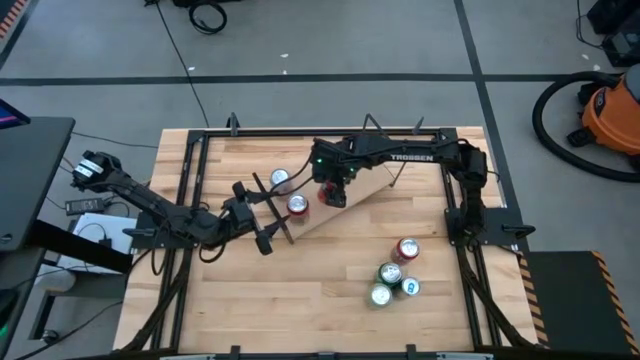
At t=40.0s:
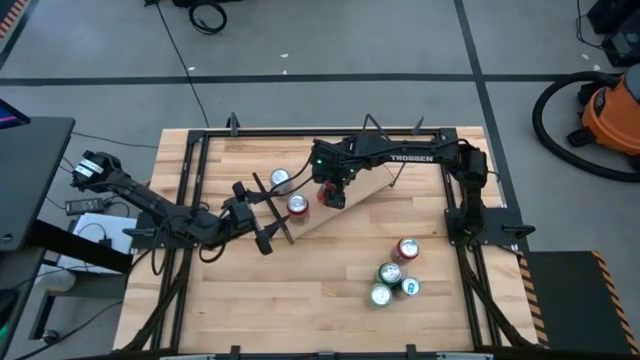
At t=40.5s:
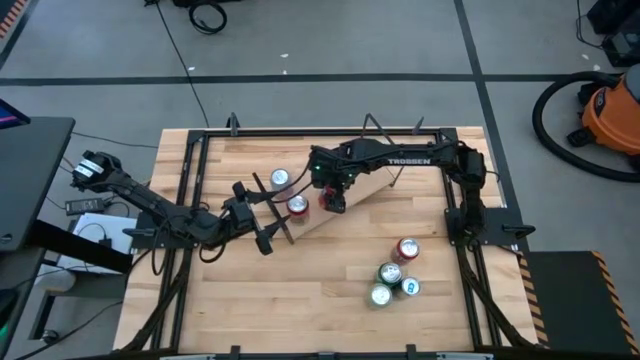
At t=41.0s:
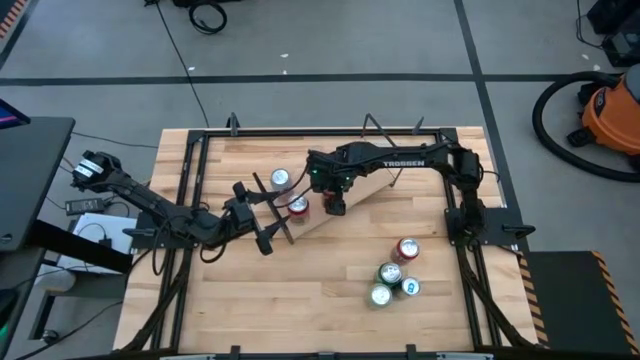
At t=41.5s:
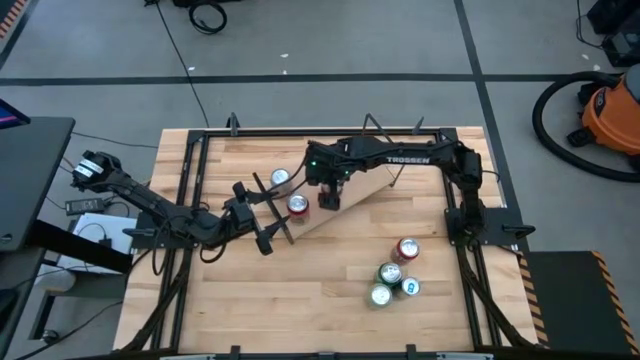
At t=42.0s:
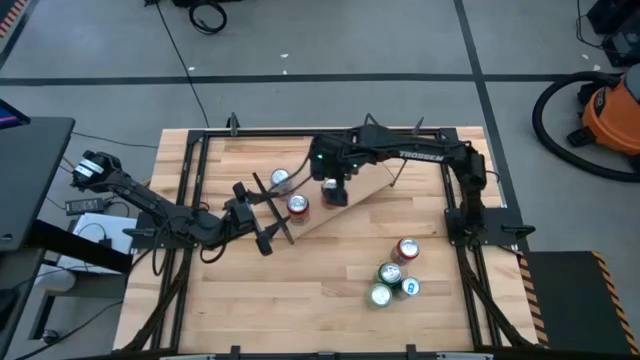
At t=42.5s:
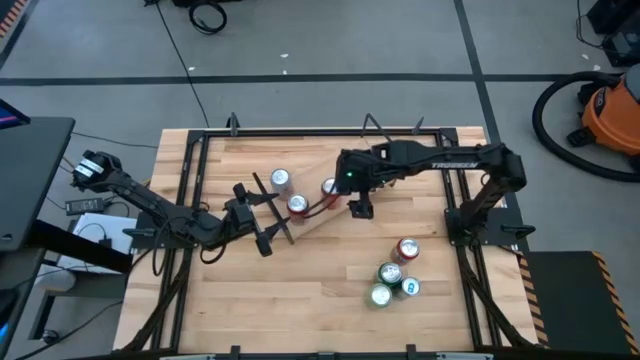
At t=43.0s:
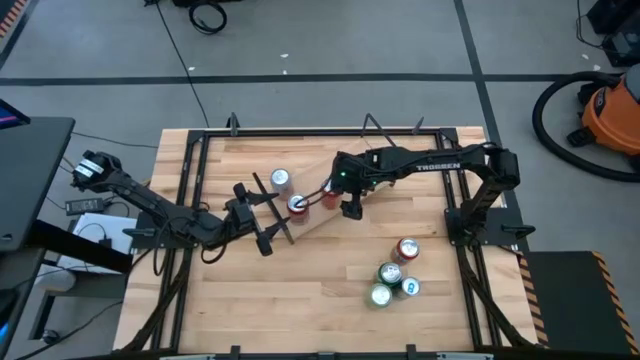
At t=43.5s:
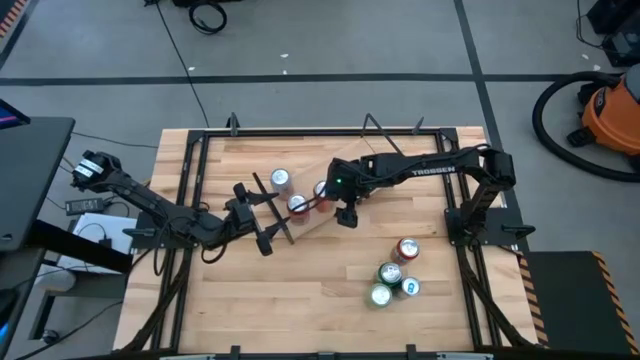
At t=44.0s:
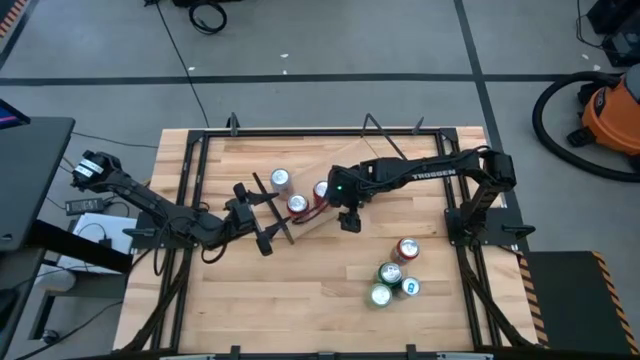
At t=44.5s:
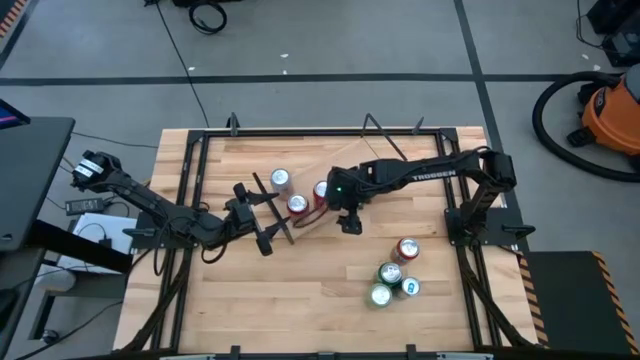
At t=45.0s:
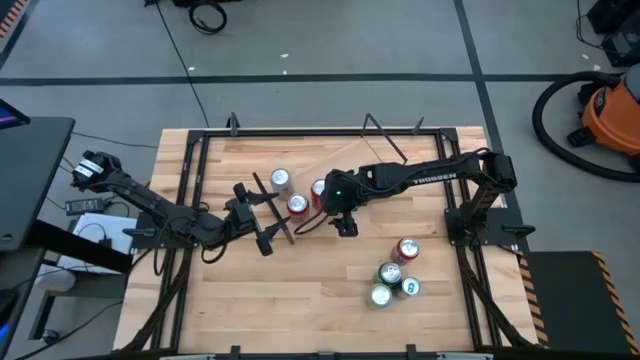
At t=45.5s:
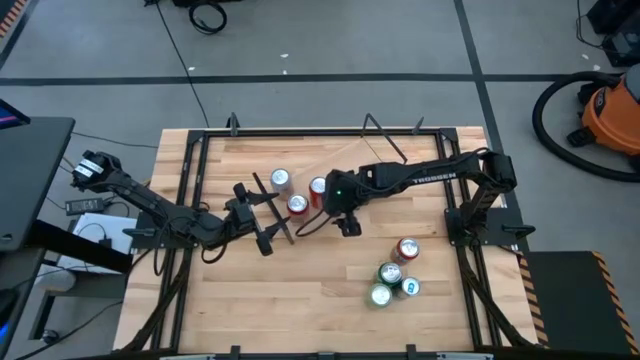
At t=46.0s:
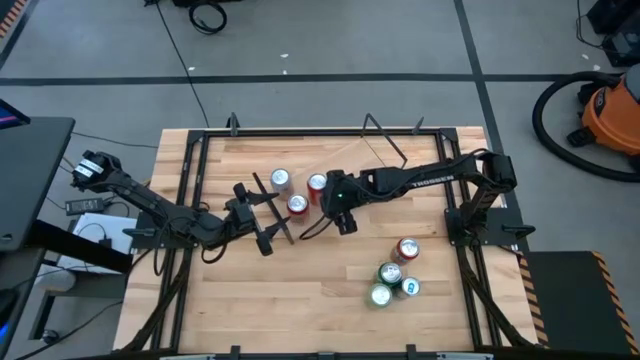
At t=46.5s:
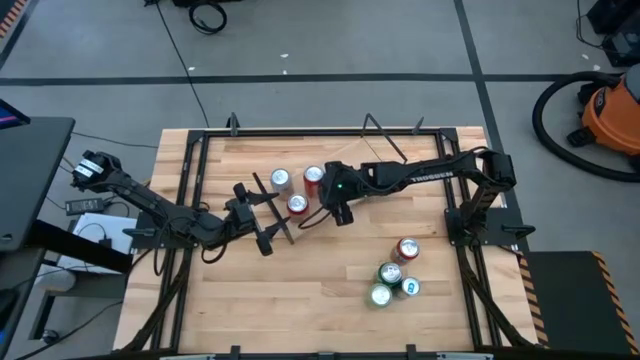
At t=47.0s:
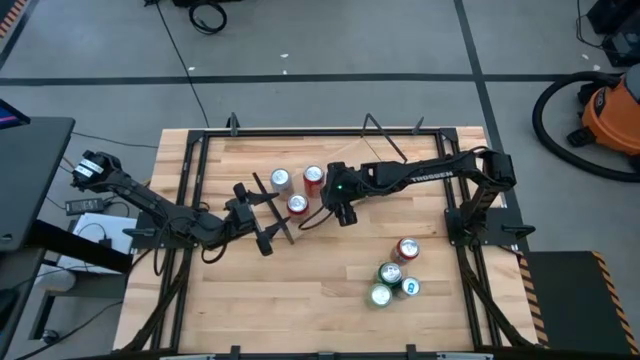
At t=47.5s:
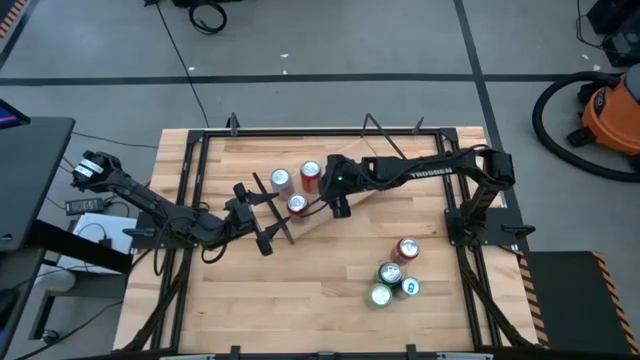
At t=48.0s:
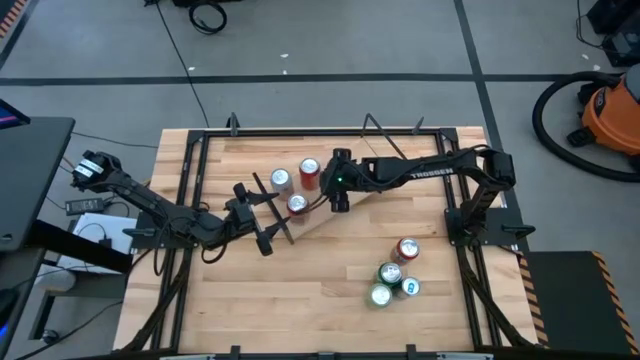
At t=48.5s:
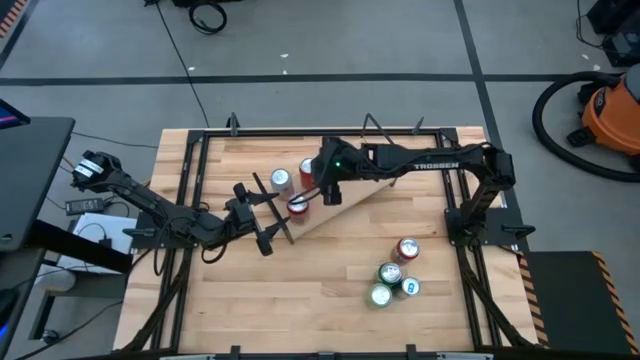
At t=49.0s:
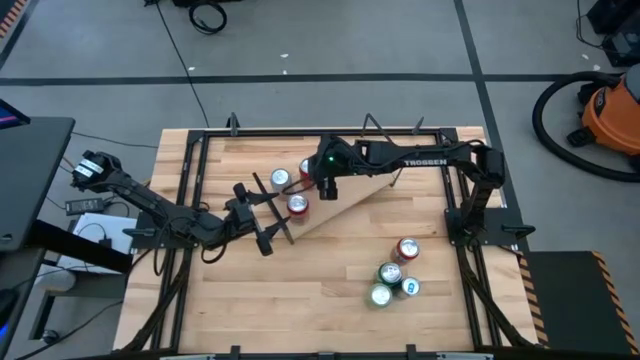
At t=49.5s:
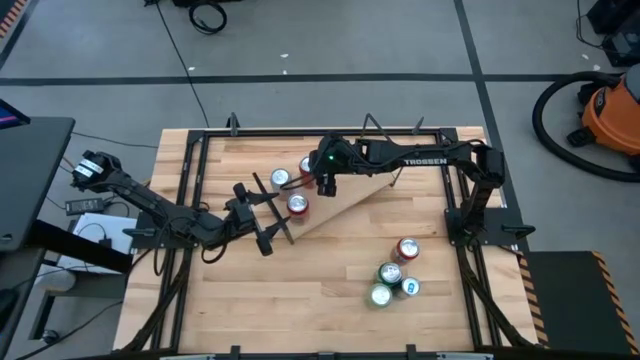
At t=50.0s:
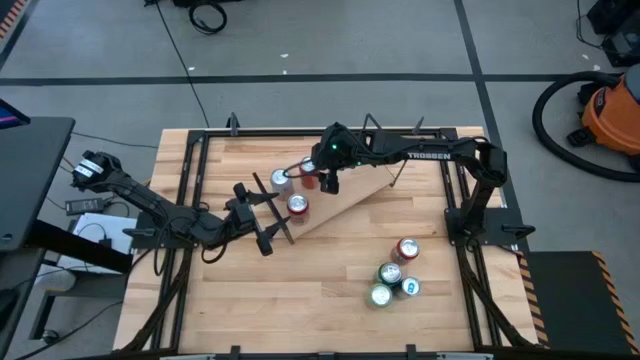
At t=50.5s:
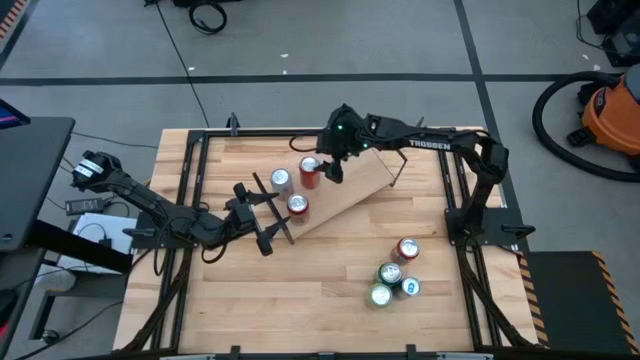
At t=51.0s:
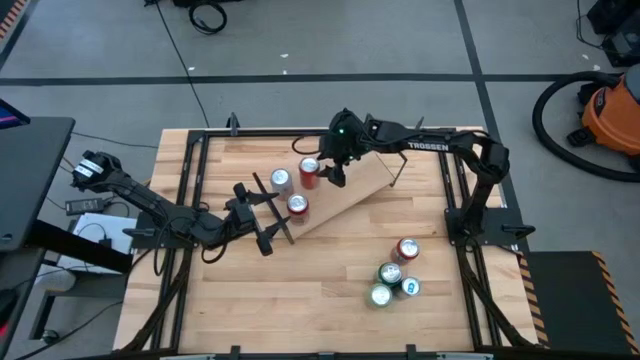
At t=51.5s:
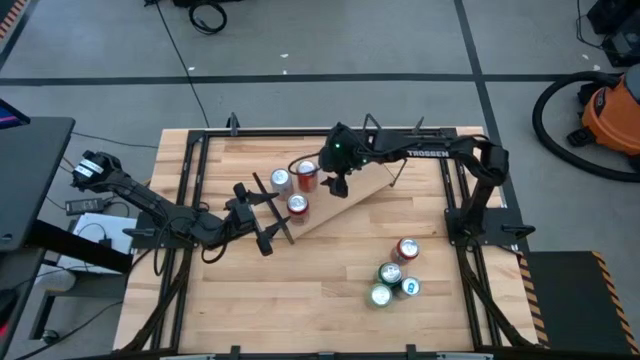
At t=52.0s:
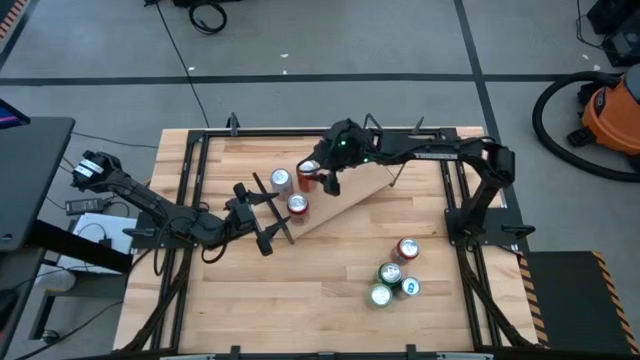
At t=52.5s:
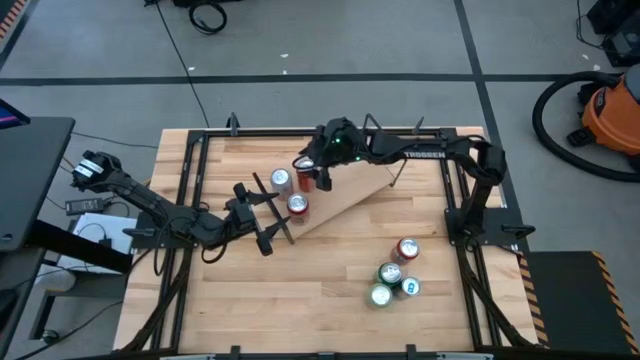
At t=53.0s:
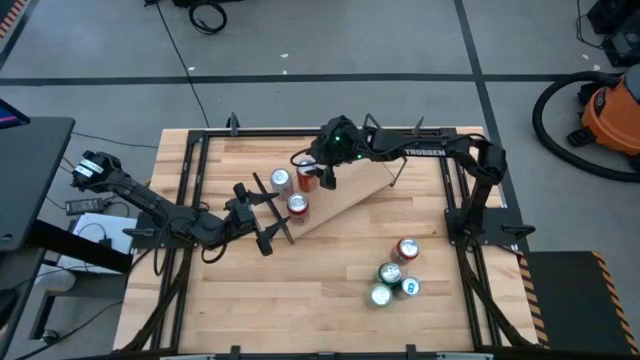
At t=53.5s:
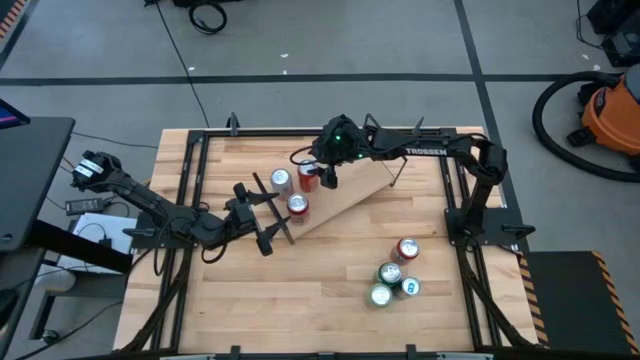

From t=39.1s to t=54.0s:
Task: Place canned beverage on shelf
Put the top red soda can on the shelf

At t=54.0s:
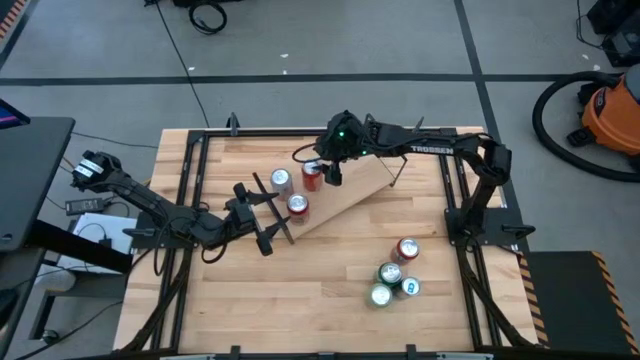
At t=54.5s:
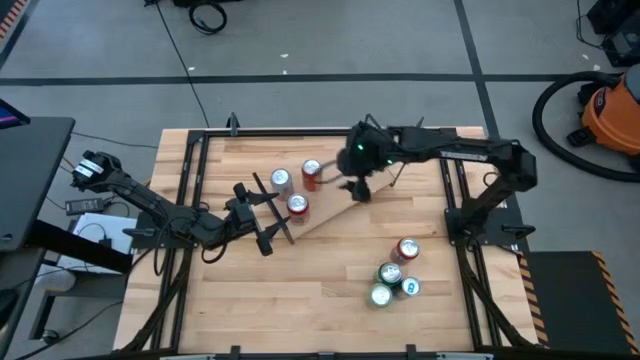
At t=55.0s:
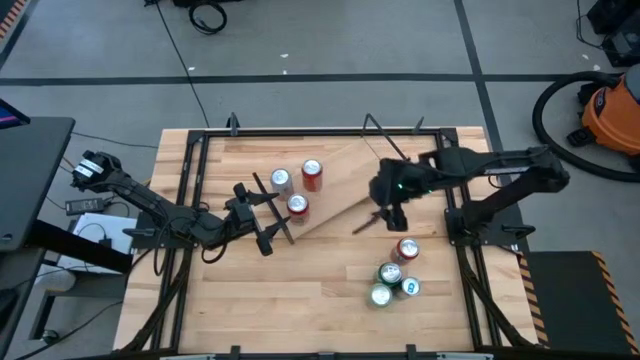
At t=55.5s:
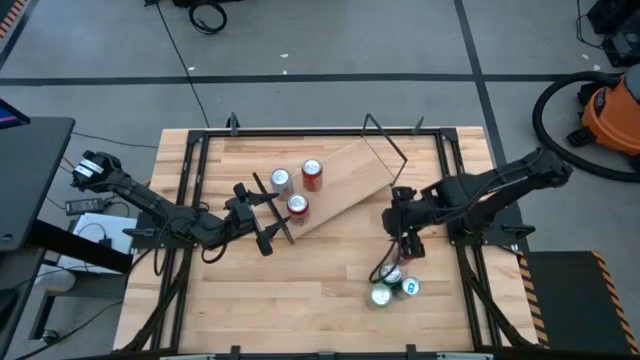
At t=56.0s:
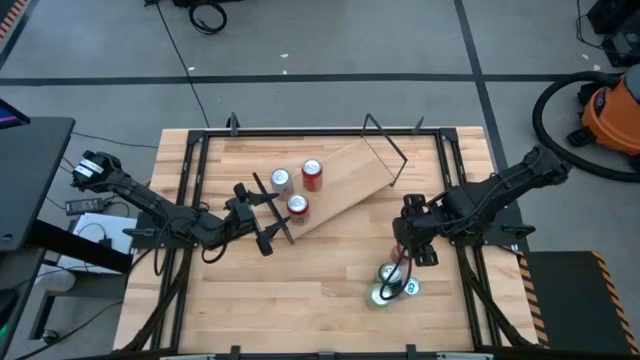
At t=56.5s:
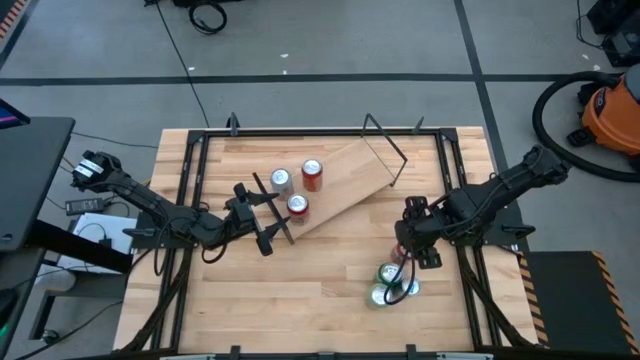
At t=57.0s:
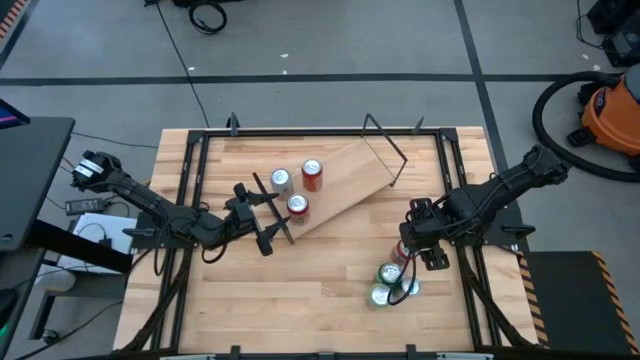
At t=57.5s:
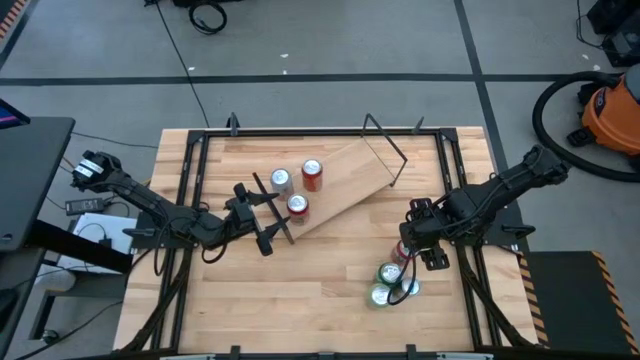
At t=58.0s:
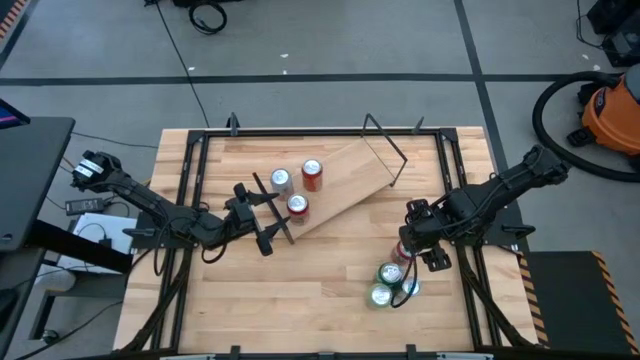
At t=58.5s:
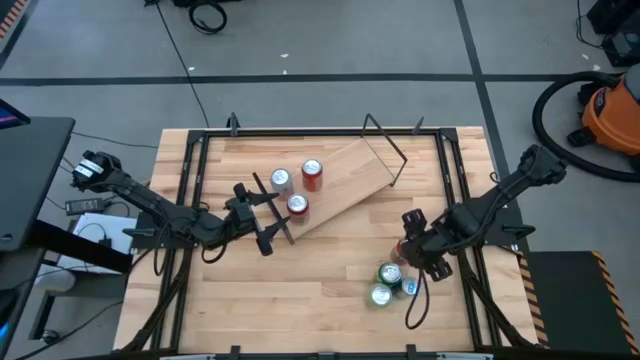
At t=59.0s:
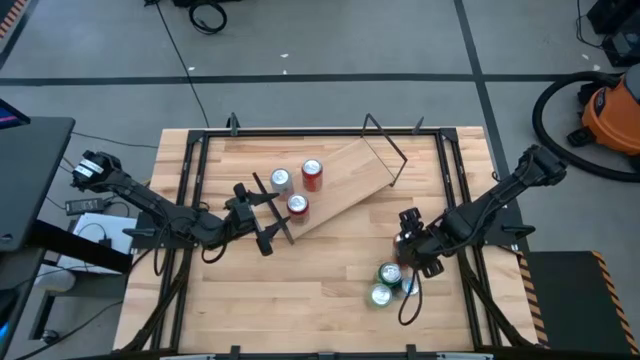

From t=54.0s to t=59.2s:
Put the red soda can on the shelf
